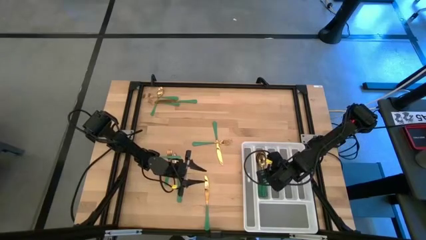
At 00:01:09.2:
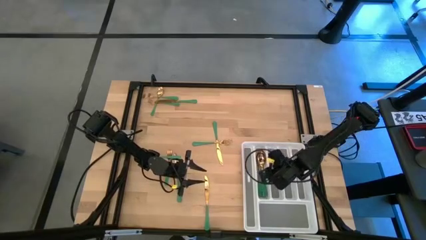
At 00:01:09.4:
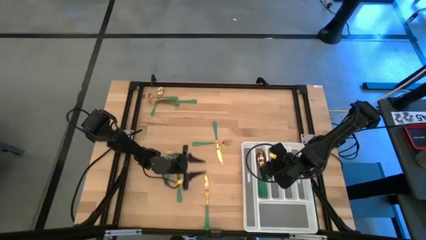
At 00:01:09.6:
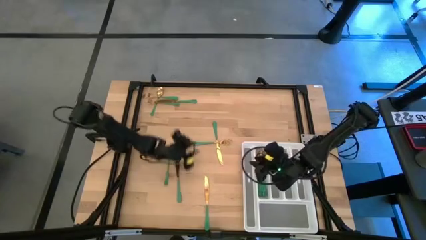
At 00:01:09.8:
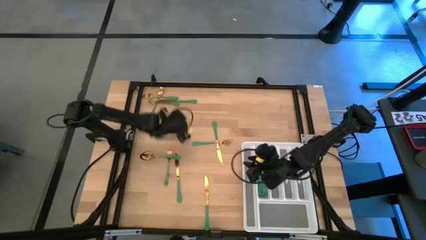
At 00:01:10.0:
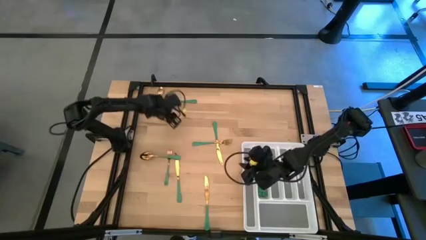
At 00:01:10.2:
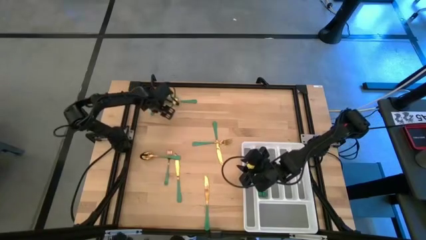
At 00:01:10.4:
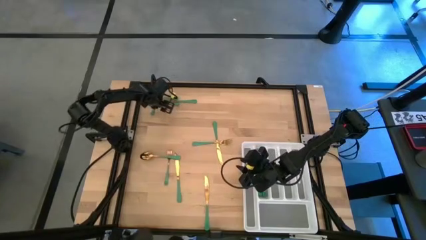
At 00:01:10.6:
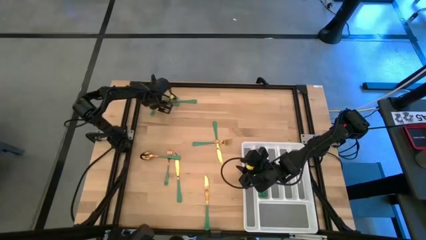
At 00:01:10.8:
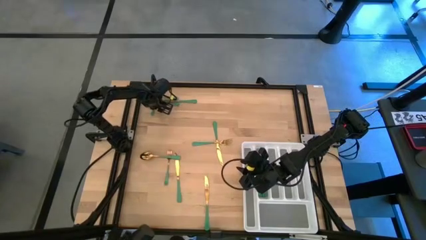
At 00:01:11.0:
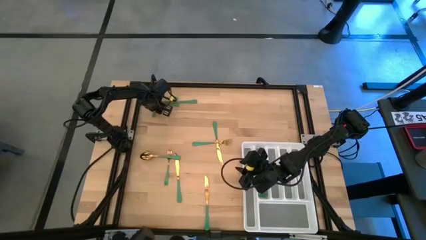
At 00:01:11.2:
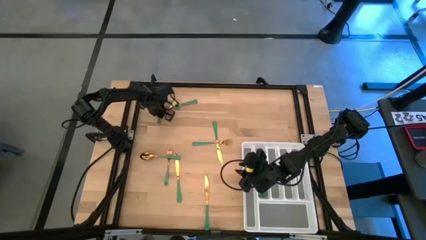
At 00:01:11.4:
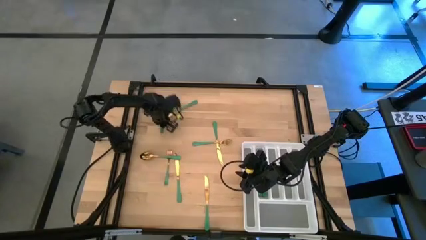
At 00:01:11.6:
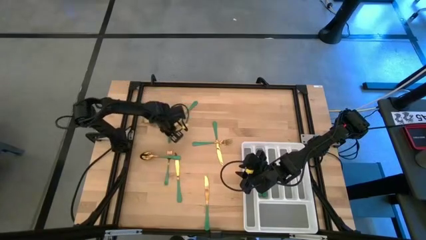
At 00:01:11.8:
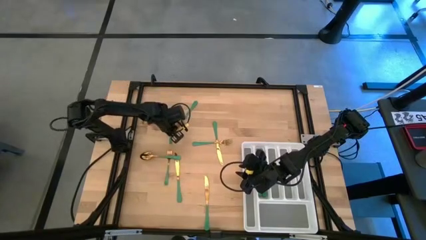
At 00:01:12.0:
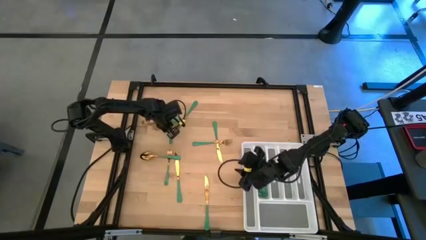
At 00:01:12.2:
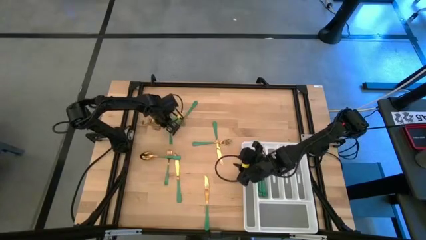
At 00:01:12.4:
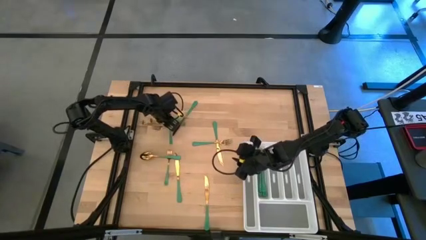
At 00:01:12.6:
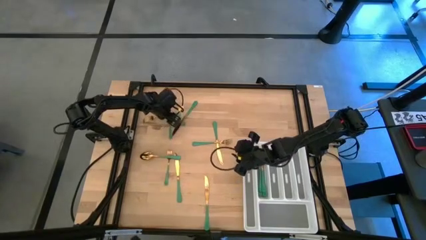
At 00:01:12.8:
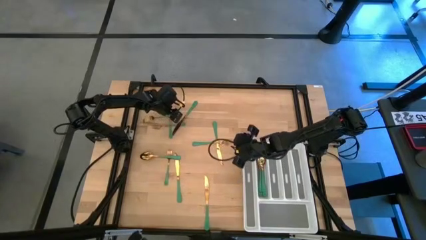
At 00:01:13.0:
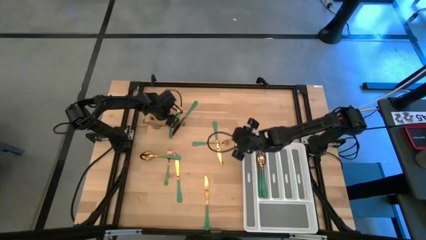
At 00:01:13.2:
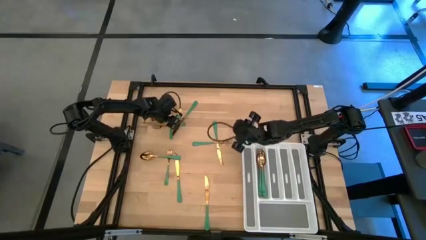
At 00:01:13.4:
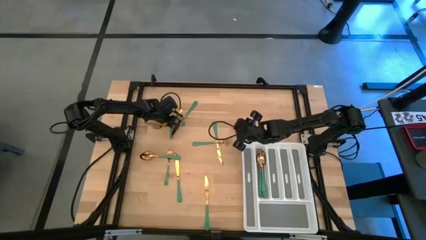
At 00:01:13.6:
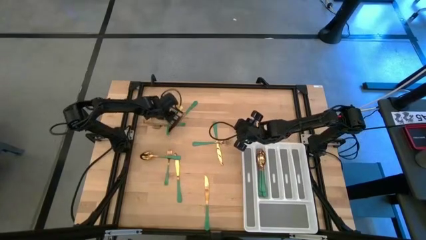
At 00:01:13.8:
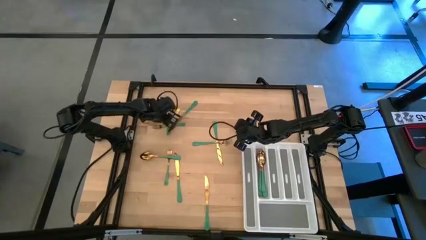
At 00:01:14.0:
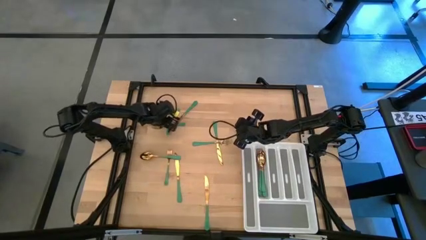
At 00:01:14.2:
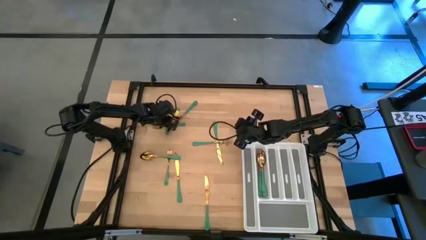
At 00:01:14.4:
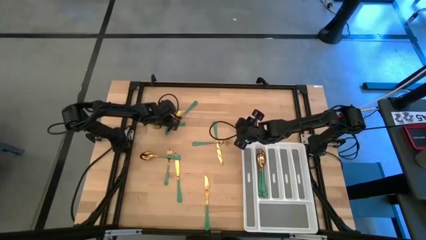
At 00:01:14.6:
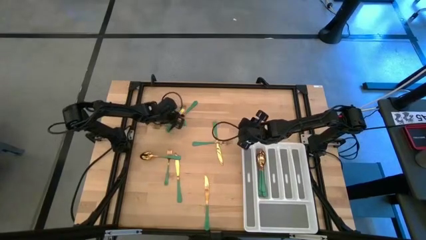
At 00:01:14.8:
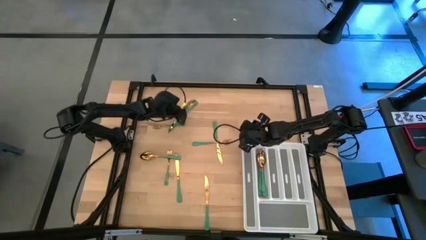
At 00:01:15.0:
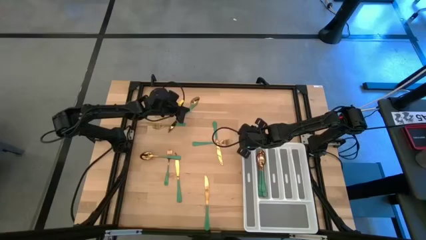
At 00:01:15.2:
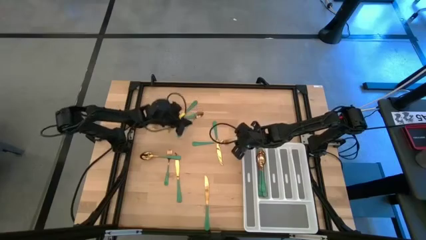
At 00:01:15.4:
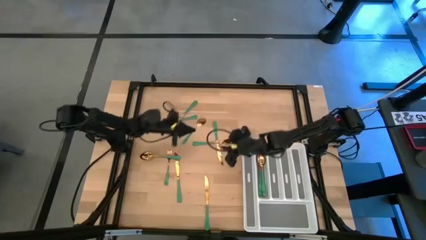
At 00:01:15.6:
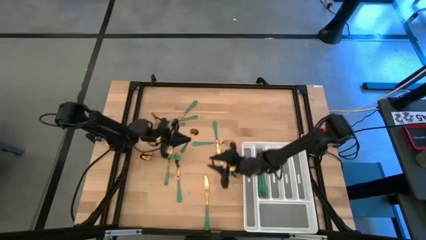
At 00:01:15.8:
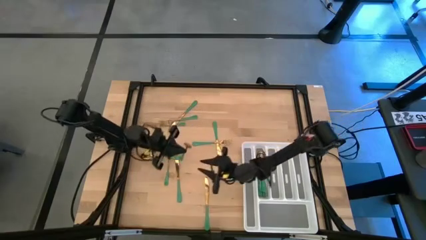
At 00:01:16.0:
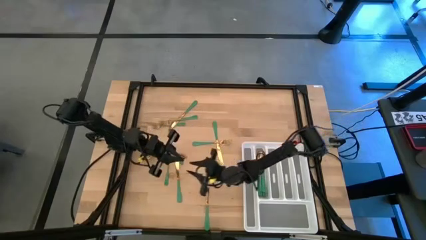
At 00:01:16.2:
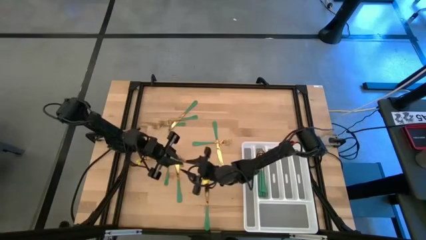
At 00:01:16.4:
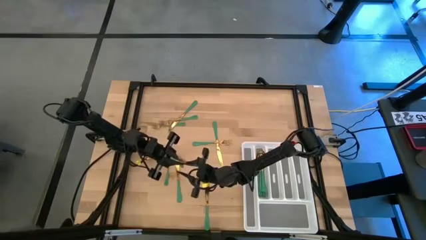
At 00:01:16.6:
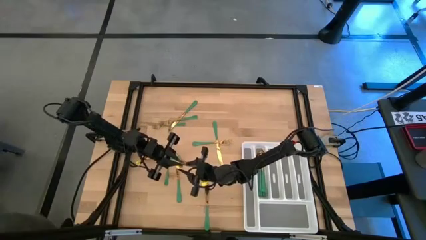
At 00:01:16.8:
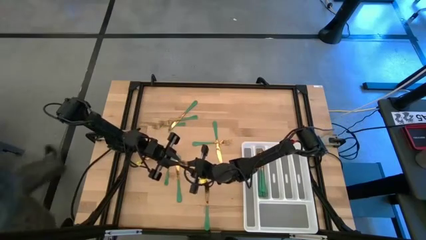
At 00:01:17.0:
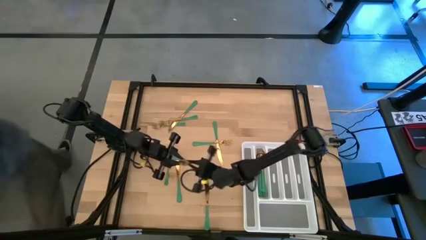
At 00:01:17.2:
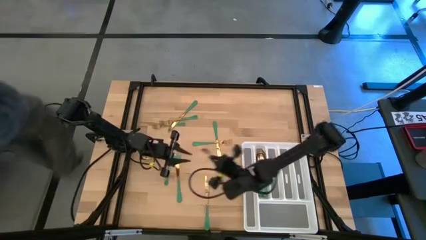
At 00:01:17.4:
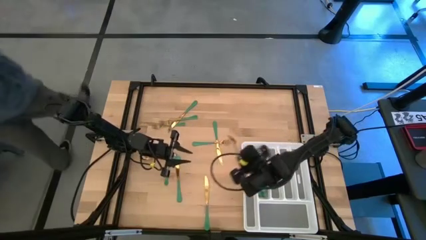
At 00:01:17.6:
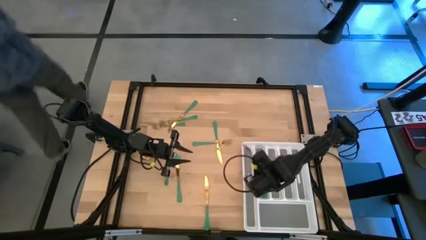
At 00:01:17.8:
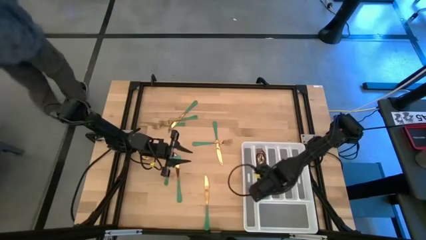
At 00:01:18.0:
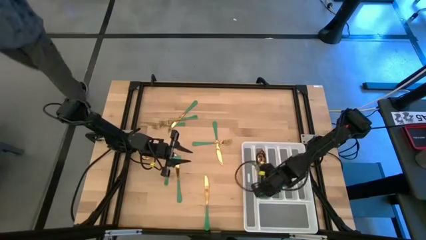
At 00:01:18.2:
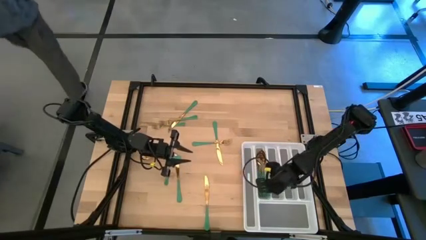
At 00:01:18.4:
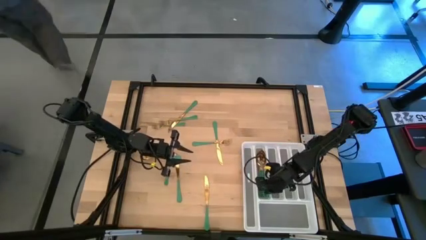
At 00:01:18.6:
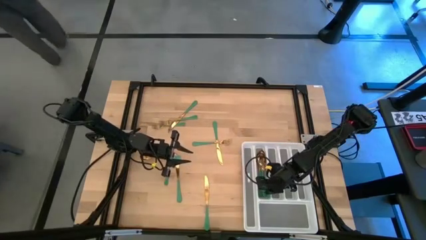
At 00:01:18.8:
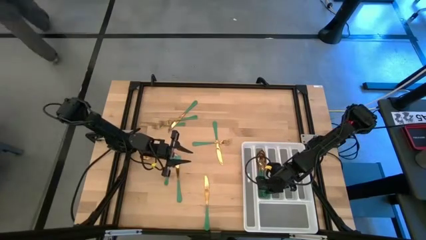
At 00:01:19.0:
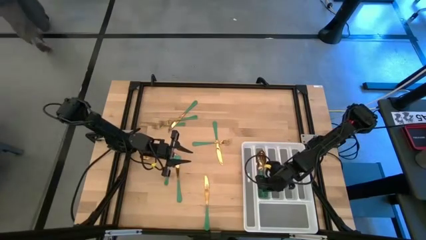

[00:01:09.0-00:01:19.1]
Task: Sort silverware
Put the top green spoon into the silverware rack
